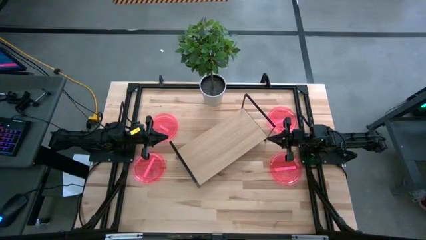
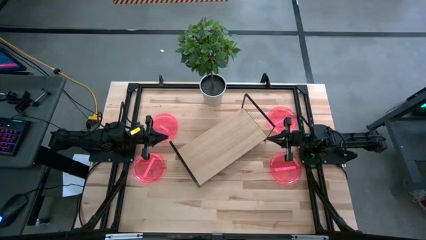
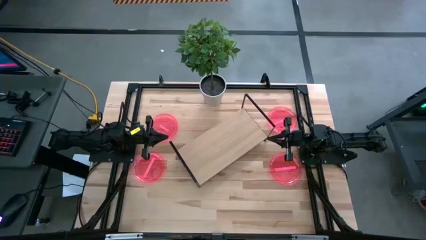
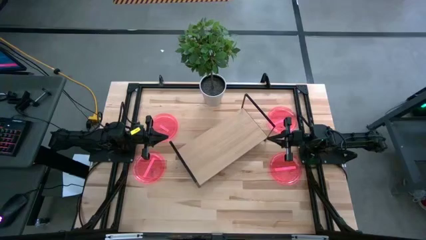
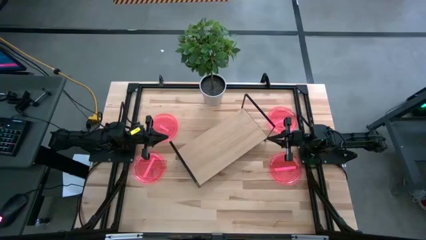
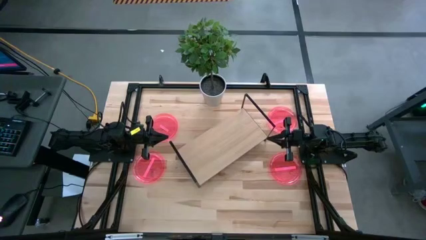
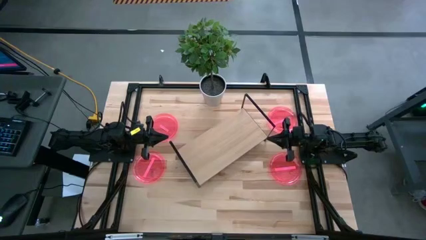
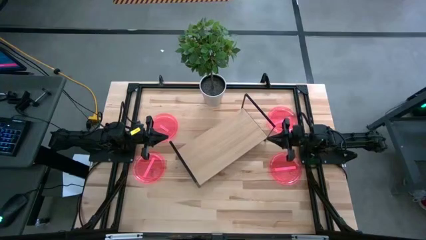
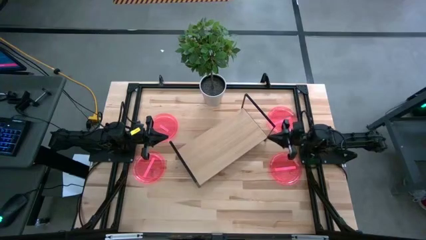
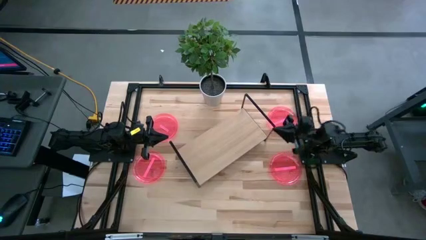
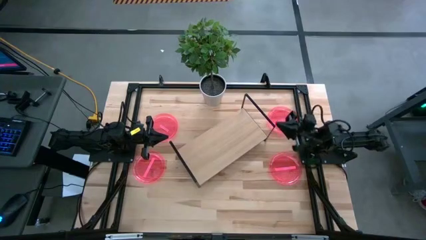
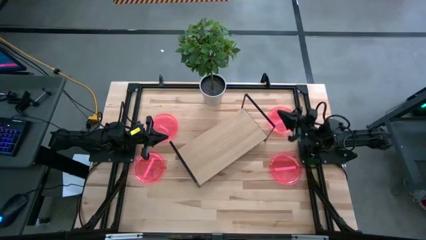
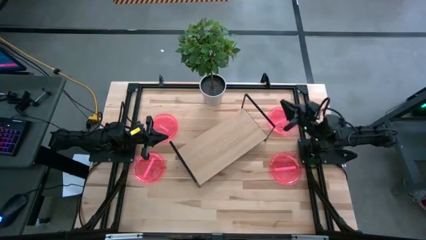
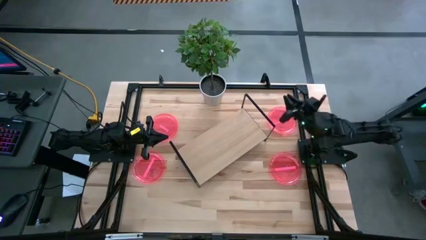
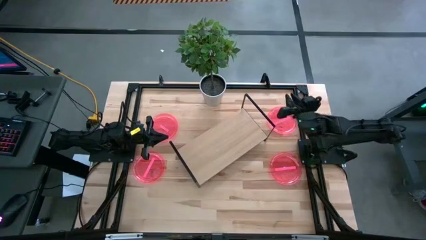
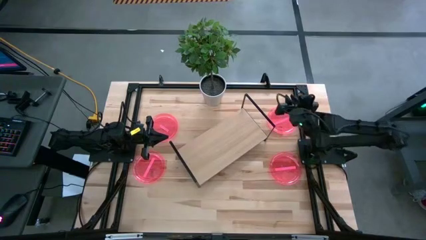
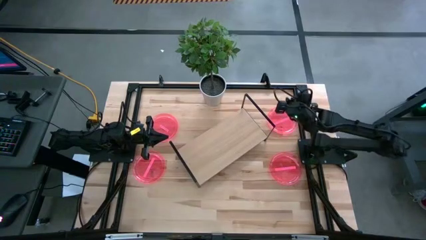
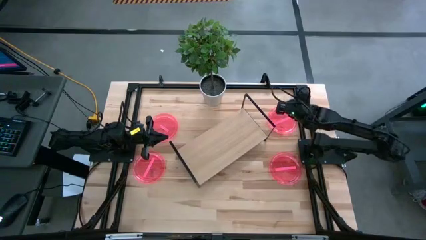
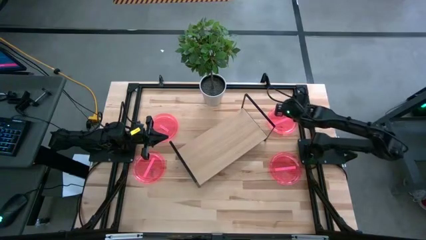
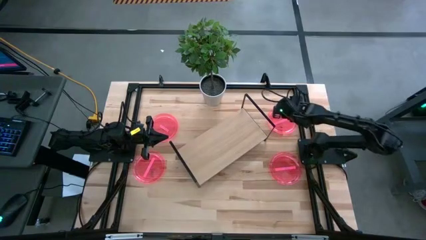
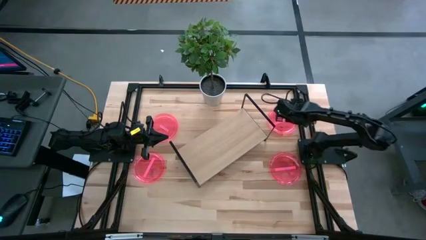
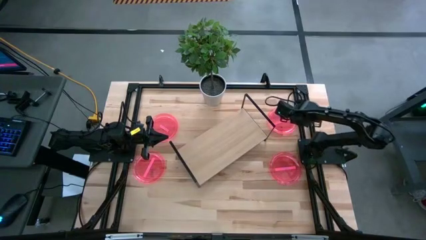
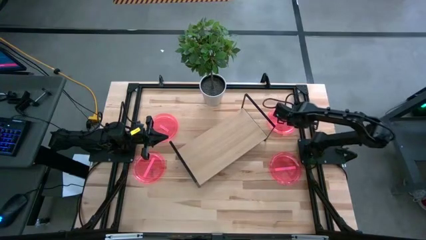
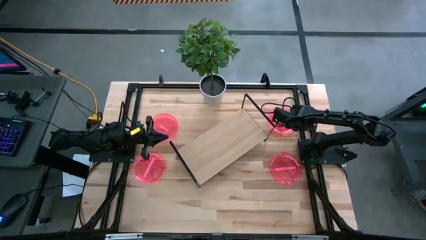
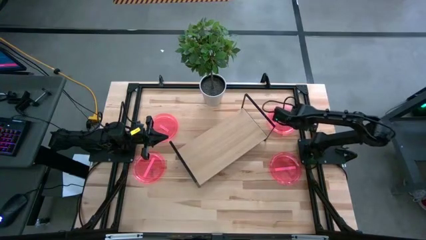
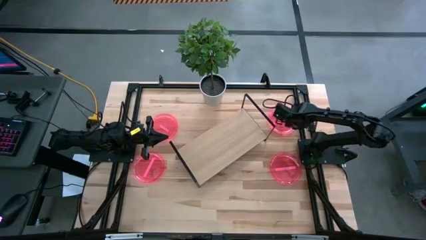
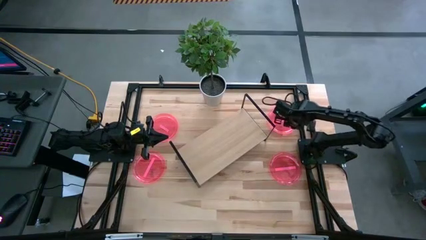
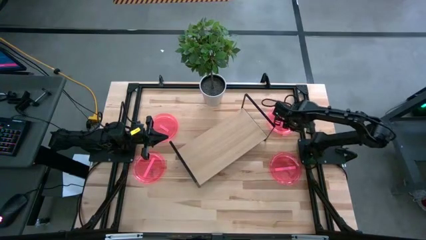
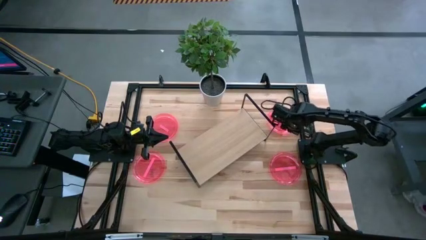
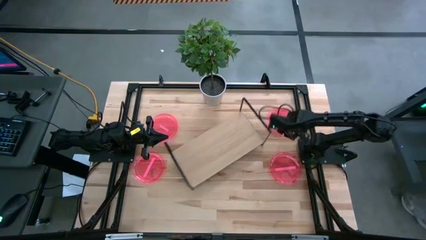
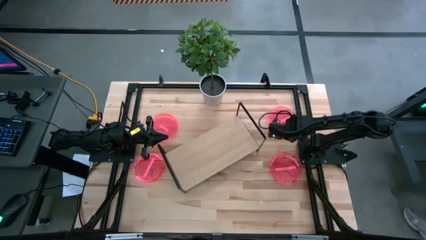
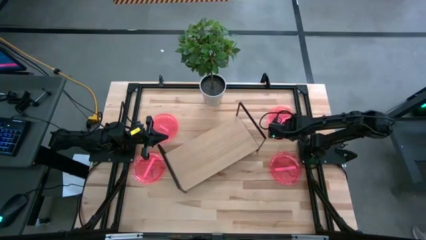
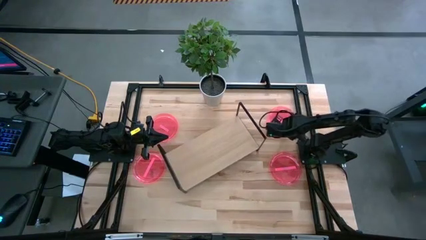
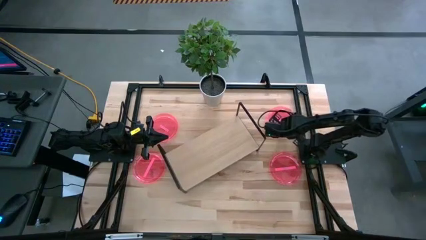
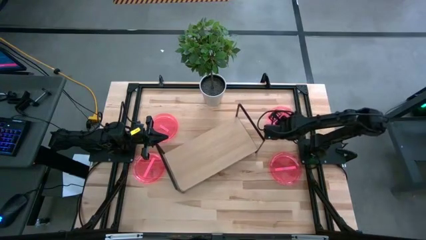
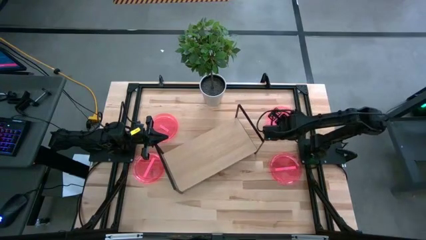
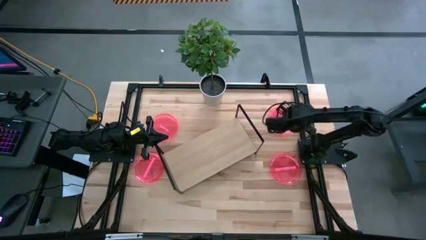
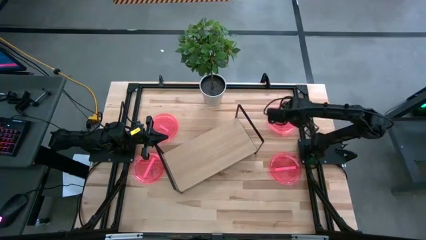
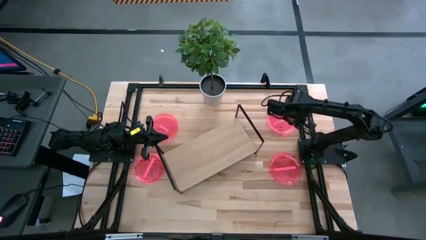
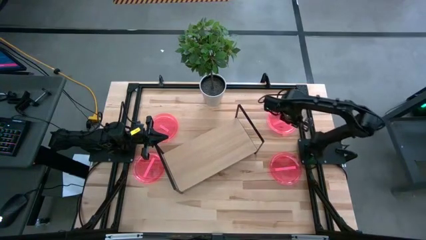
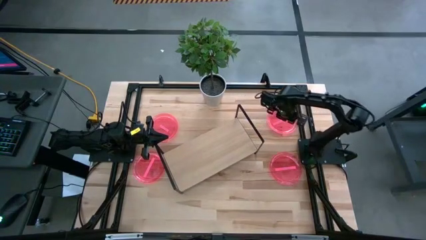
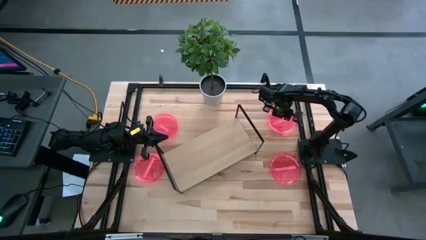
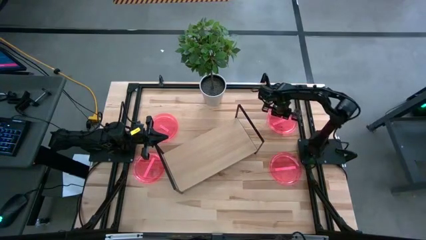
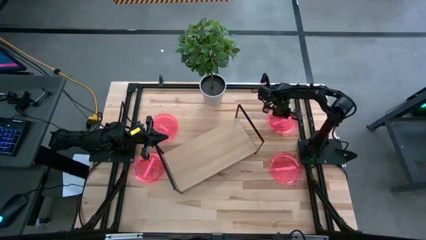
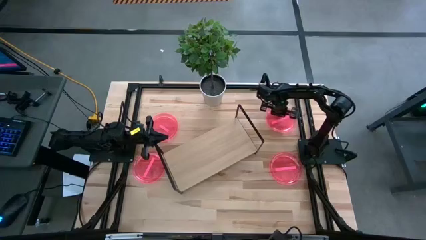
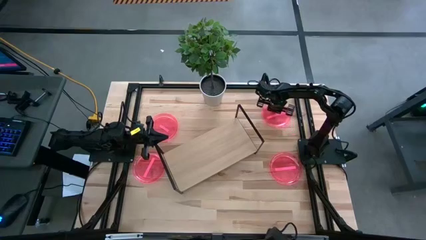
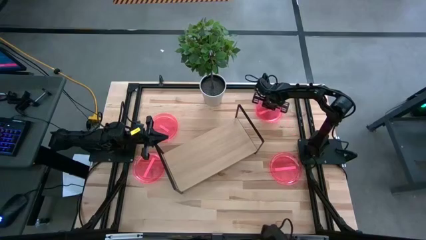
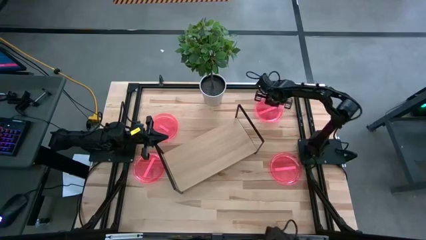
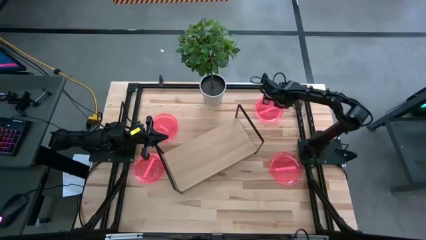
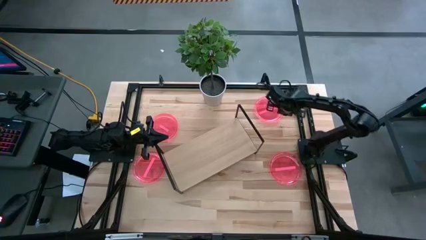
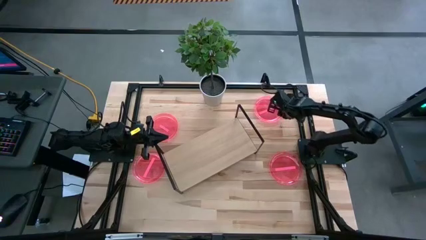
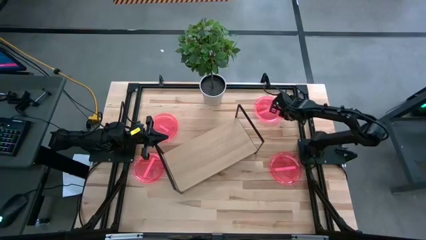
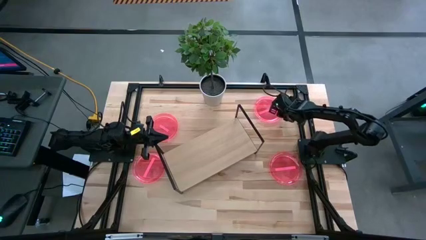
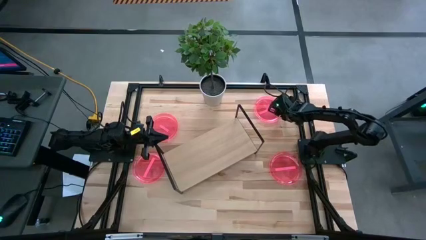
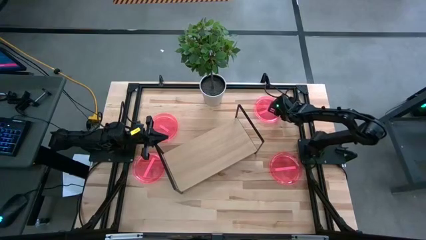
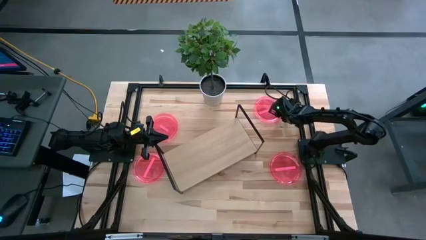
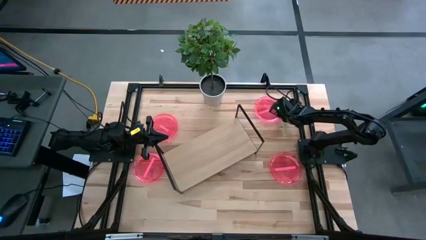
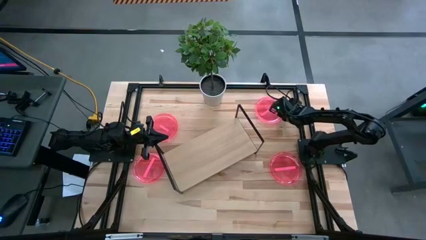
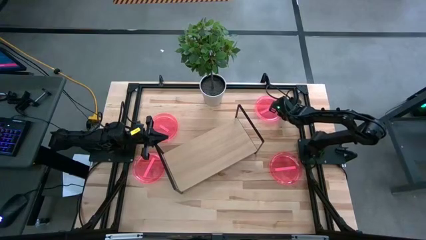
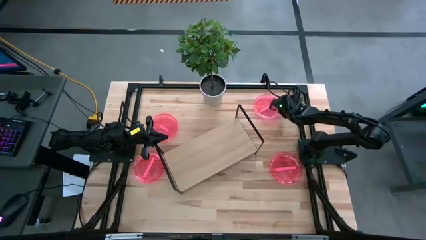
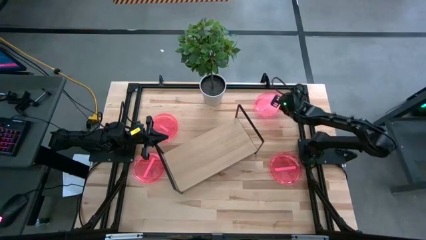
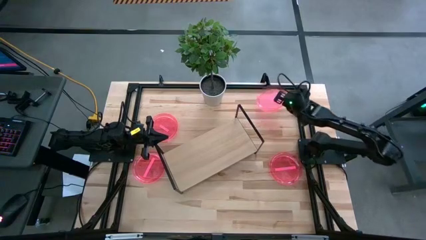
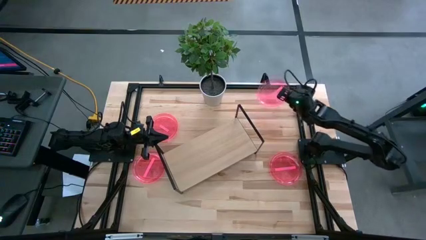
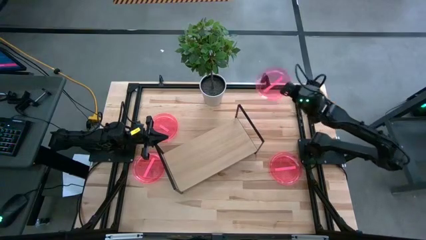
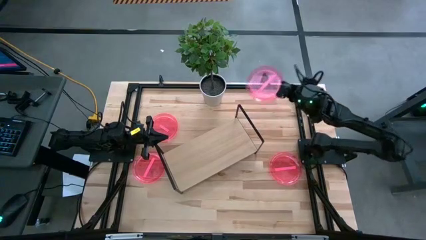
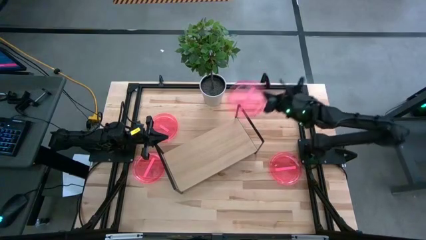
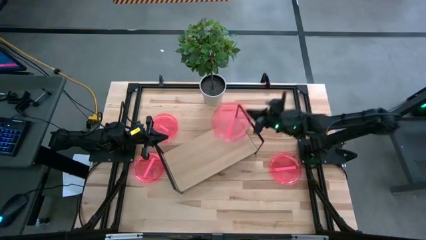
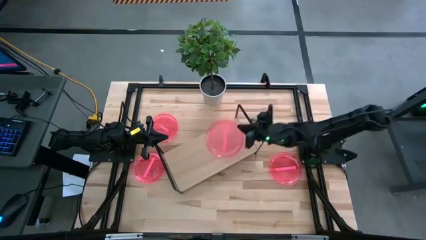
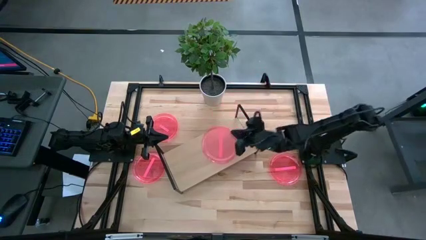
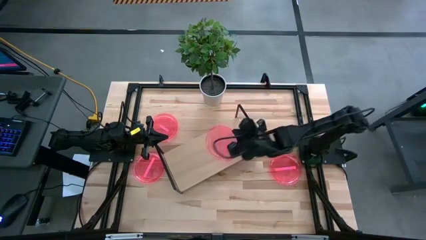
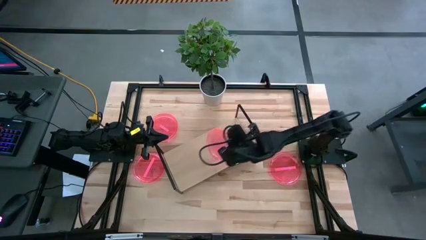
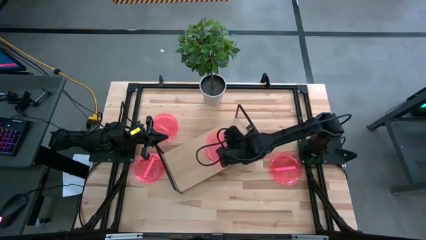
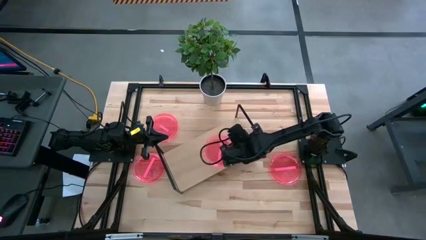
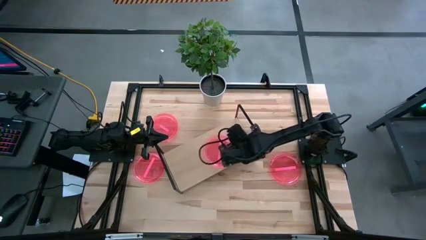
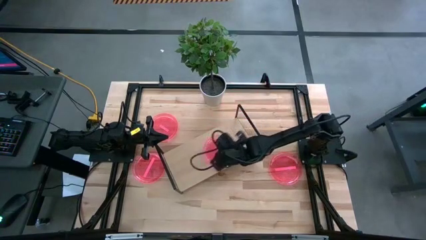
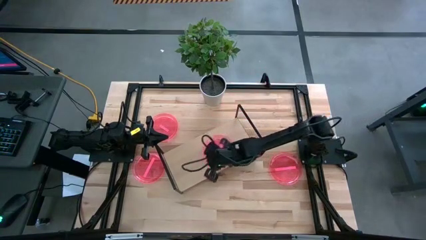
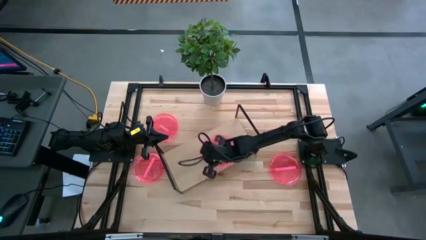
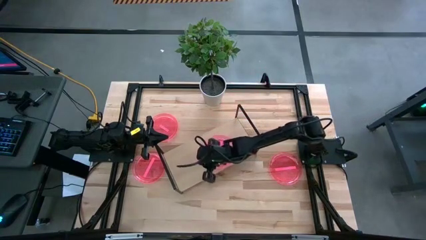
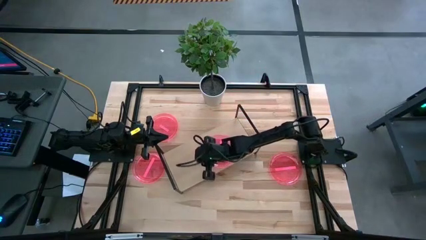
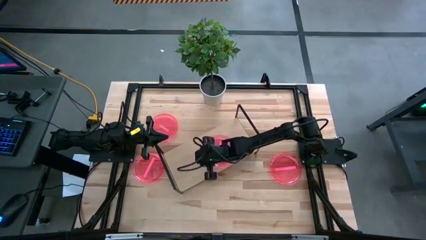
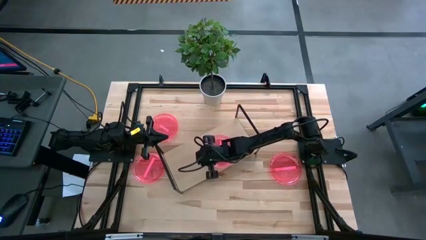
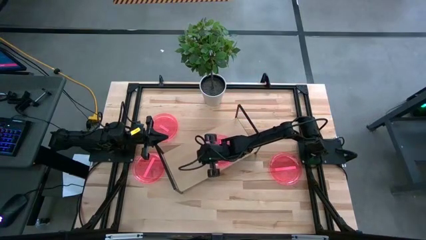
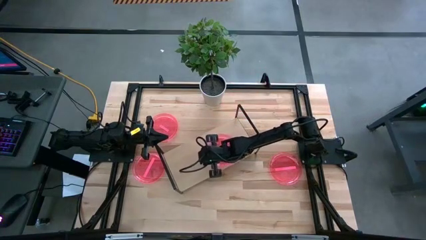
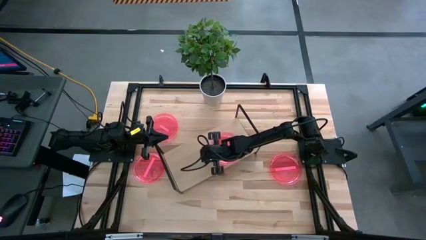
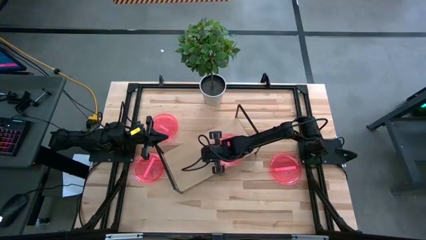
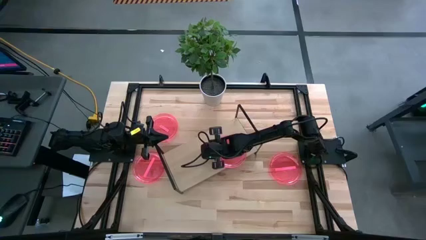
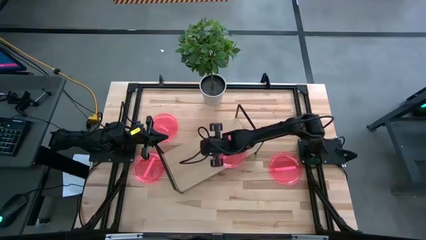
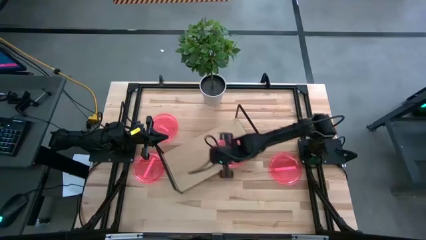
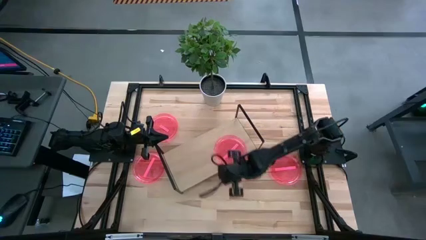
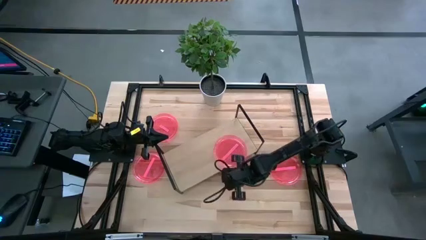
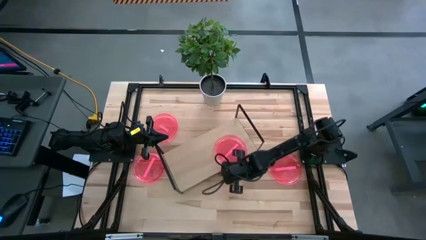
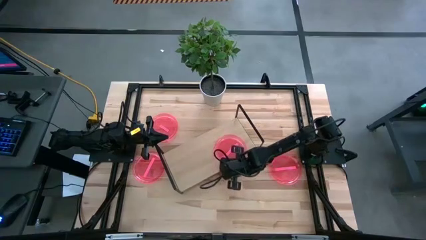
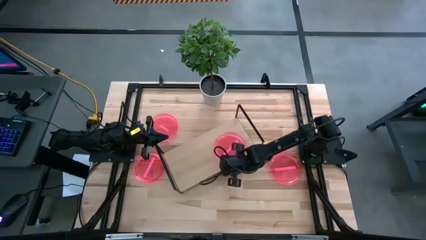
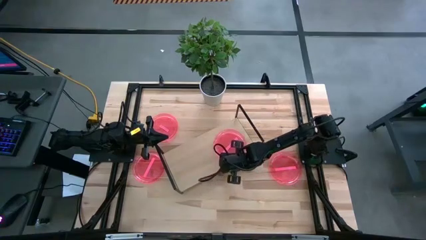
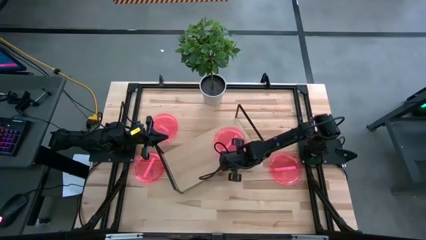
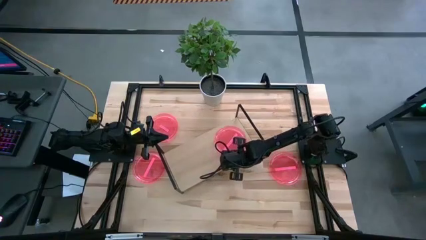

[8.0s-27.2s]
Task: Place and stack plates onto a shelf
Put the pink plate on the shelf
